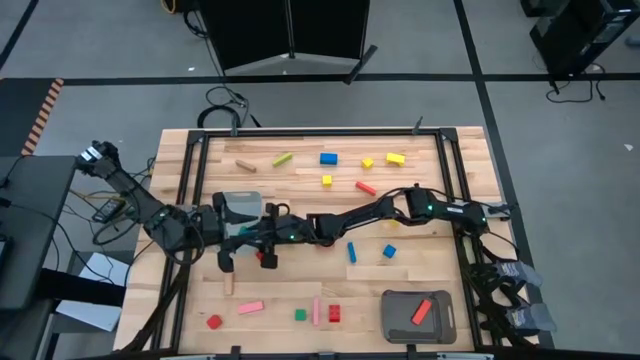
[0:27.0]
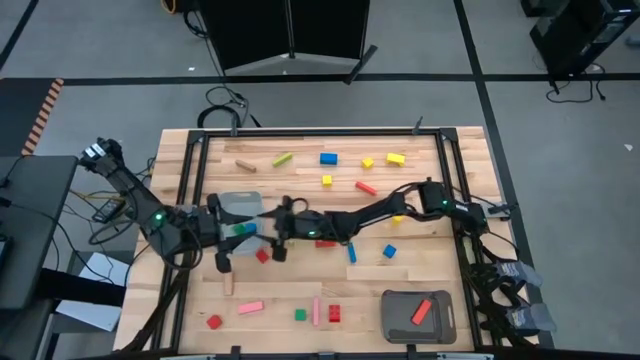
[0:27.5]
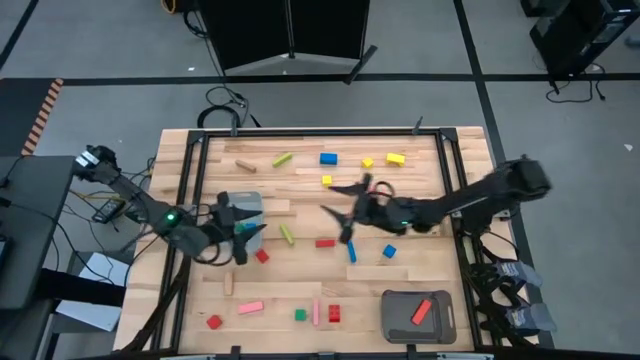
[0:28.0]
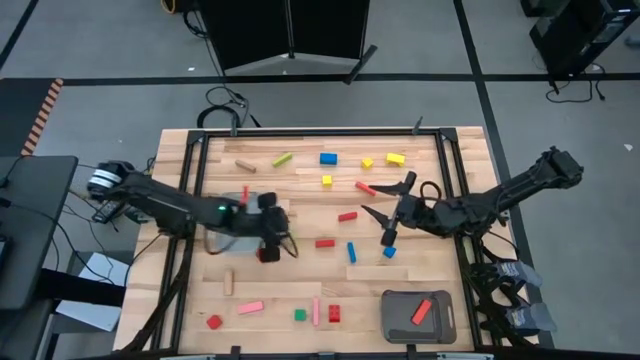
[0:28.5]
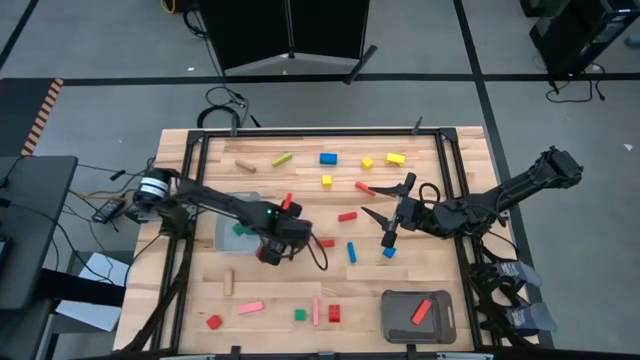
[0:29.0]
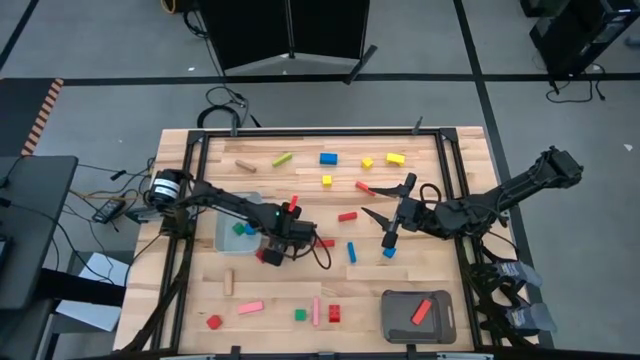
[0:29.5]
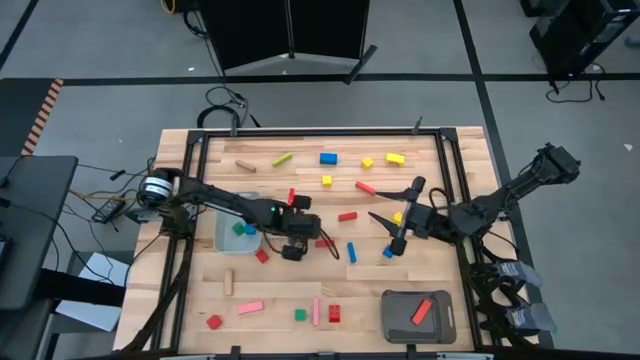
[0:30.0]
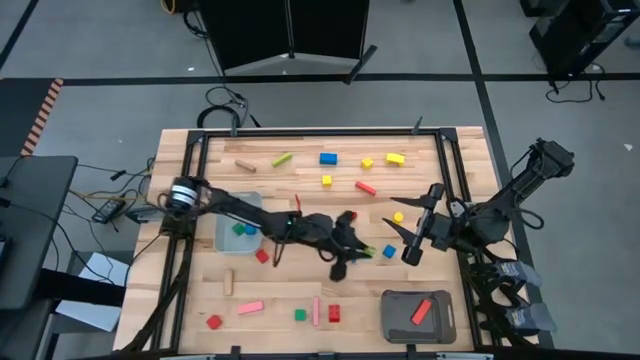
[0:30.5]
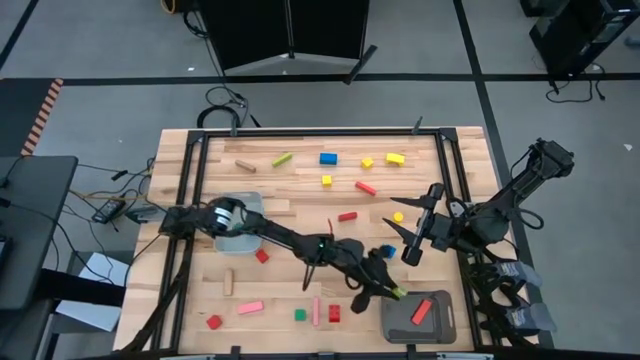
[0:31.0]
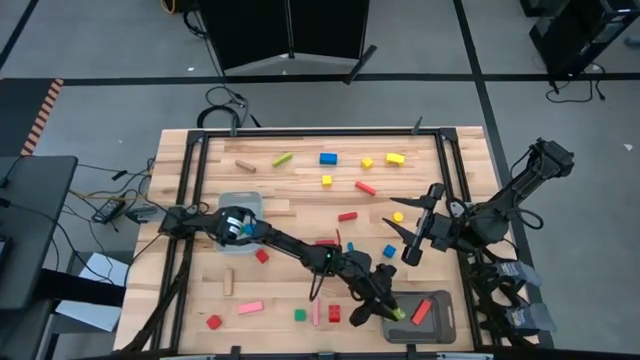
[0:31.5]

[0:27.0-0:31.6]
Task: Sort blocks by size
Put the bottom light green block into the black bin

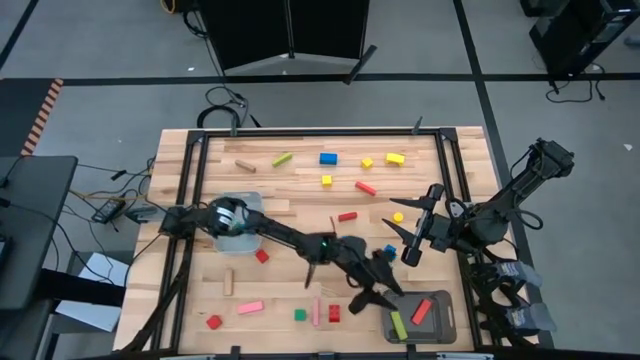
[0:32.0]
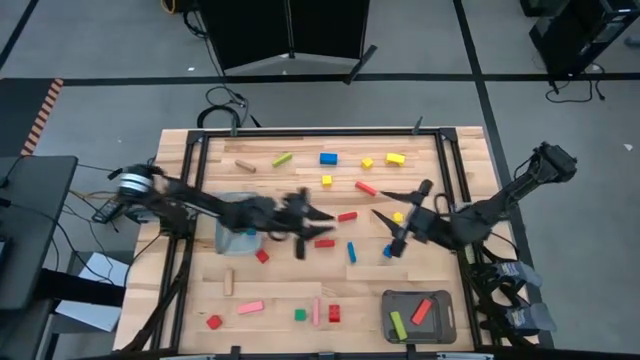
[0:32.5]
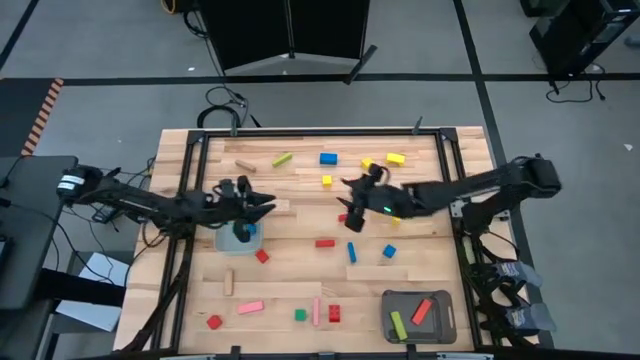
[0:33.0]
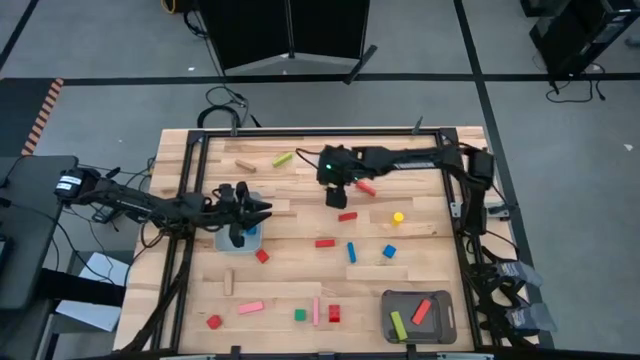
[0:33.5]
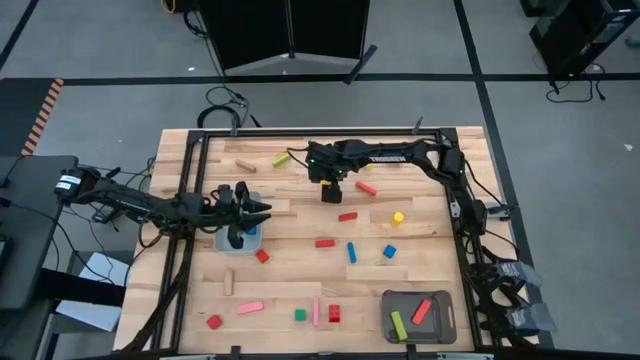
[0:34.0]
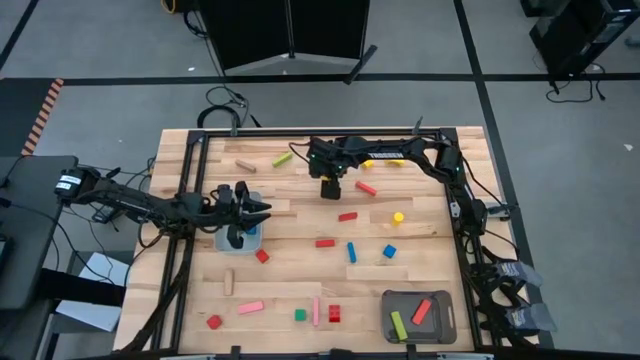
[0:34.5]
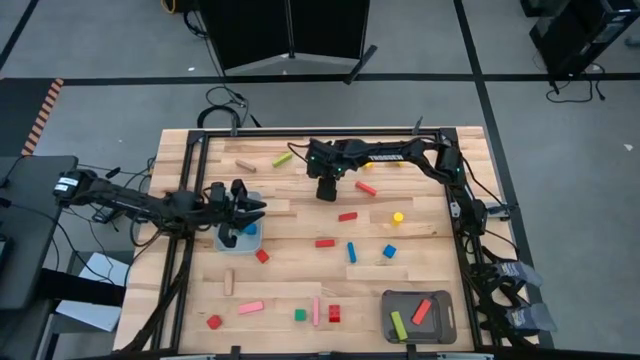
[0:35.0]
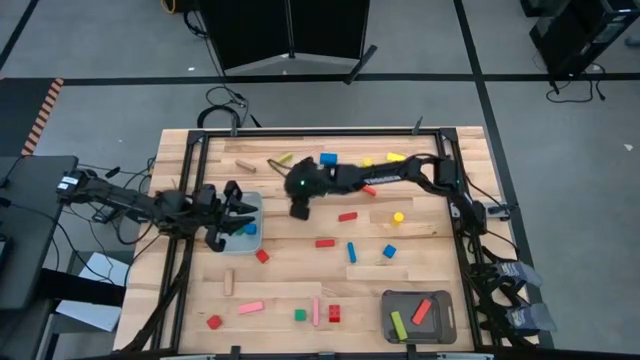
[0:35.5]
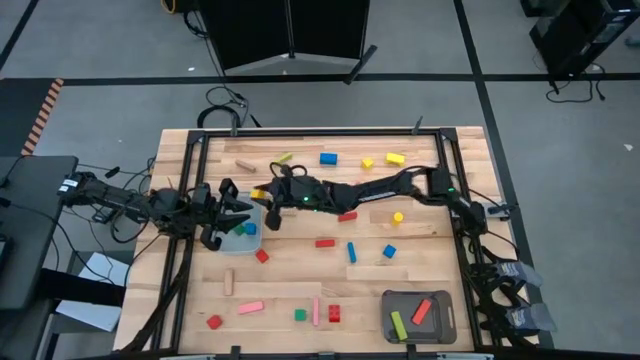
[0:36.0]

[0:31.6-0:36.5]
Put the middle left yellow block into the grey bin

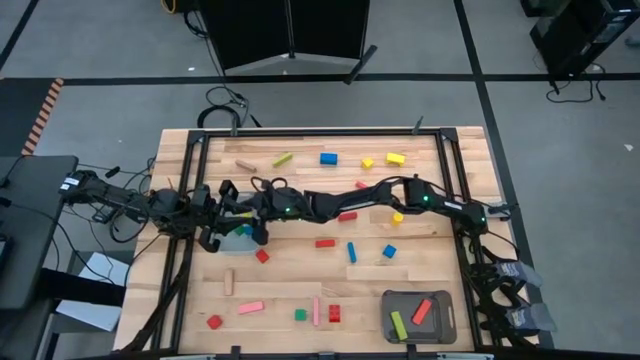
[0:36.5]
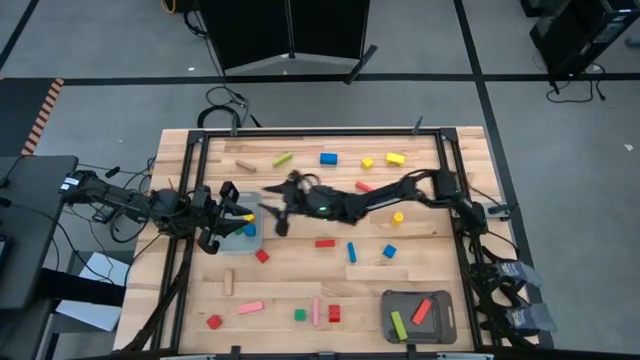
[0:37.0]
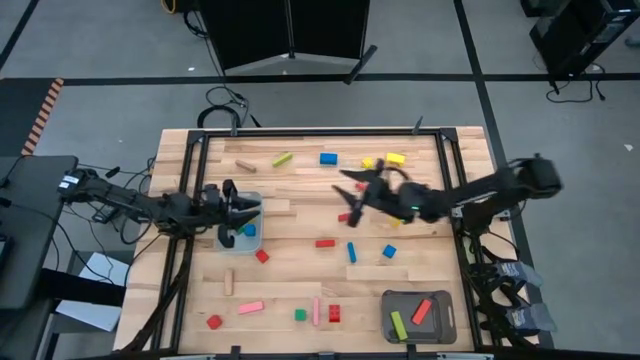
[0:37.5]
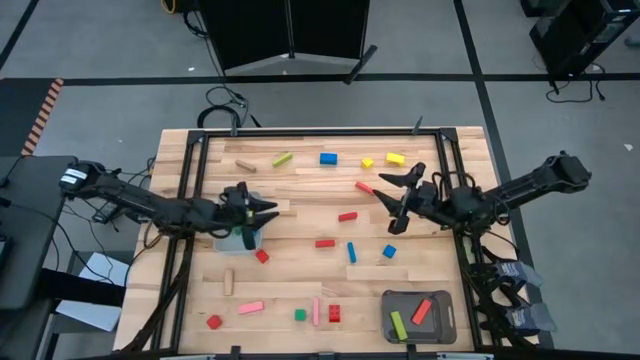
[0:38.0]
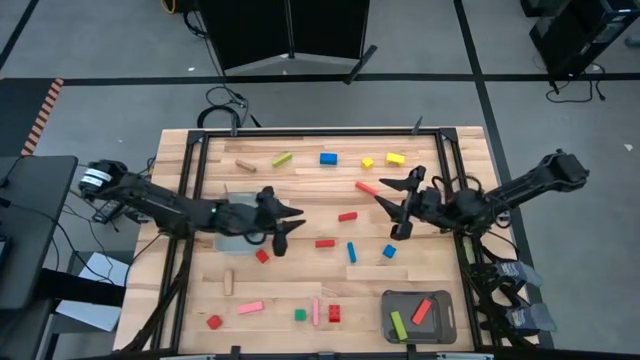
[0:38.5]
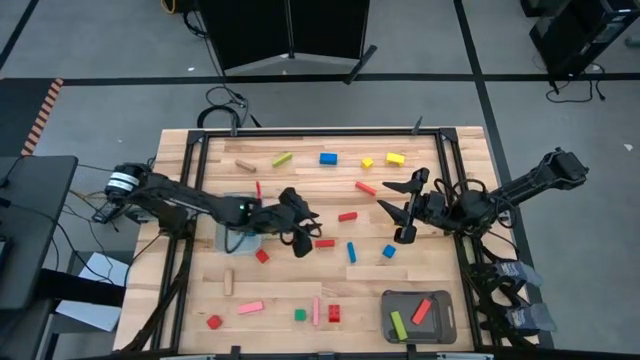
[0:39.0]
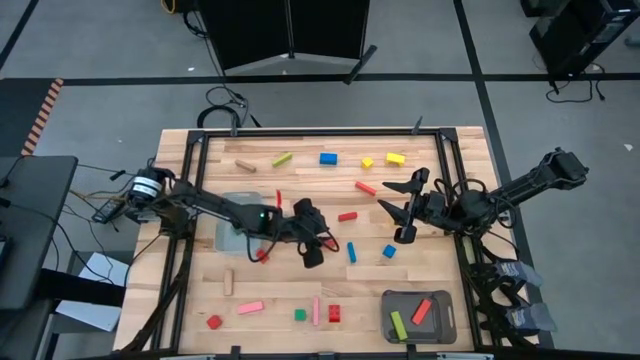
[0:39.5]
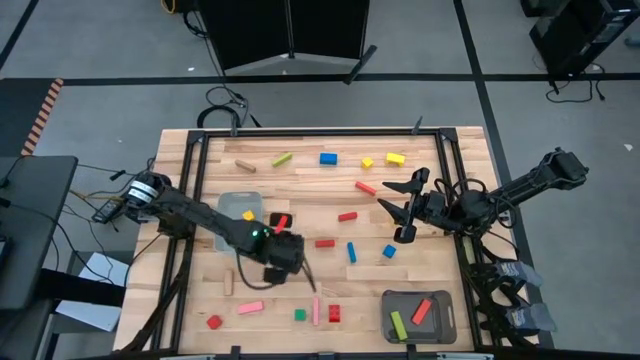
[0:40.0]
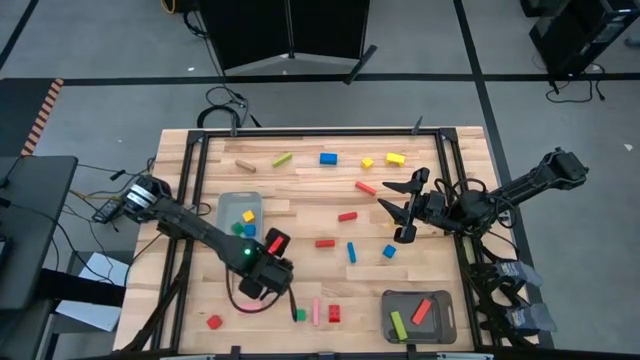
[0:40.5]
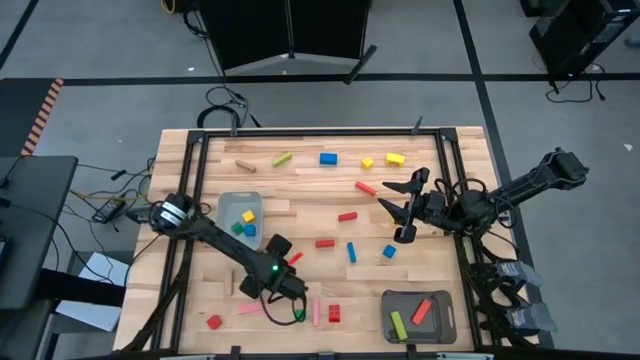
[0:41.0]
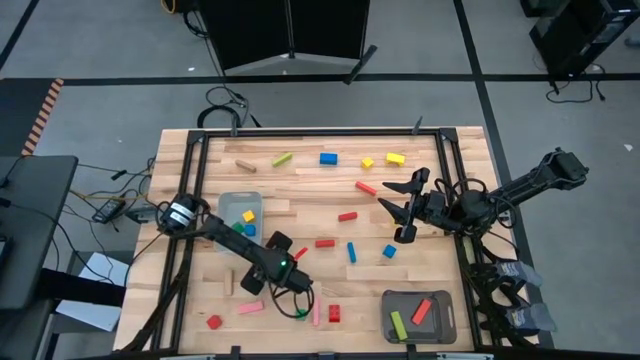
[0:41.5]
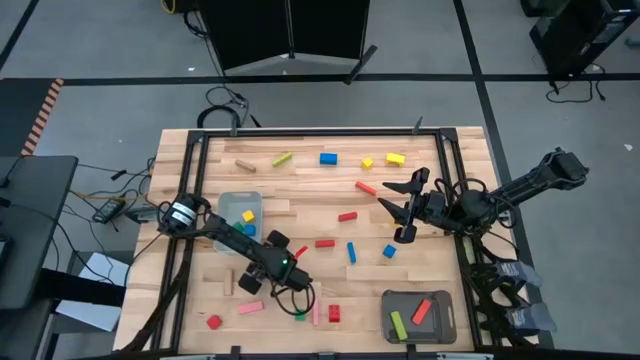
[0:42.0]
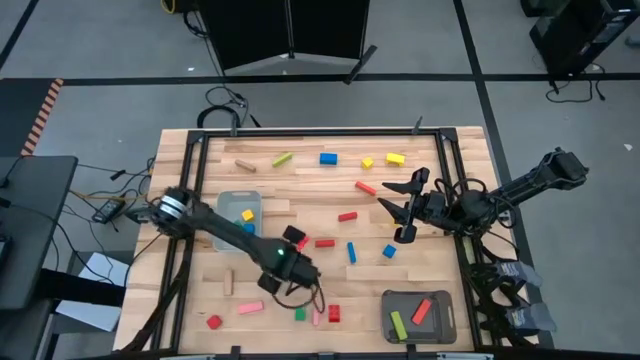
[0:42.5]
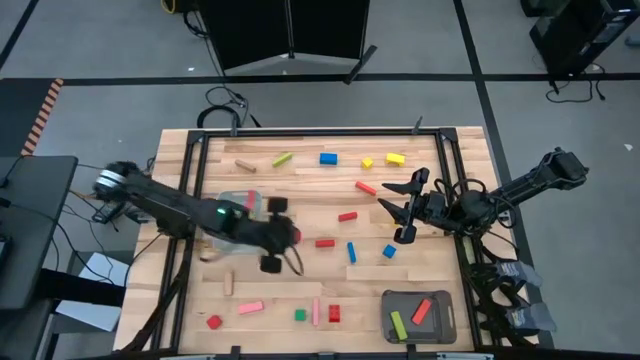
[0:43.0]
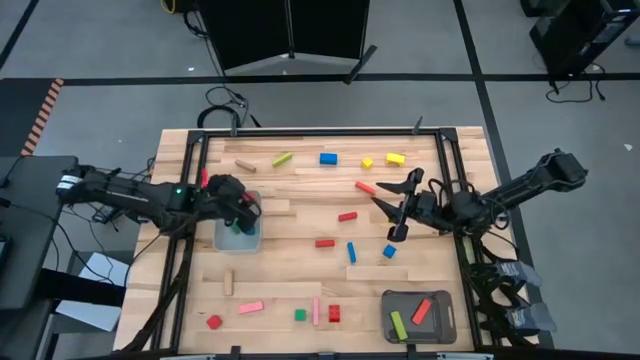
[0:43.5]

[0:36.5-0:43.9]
Put the middle left red block into the grey bin

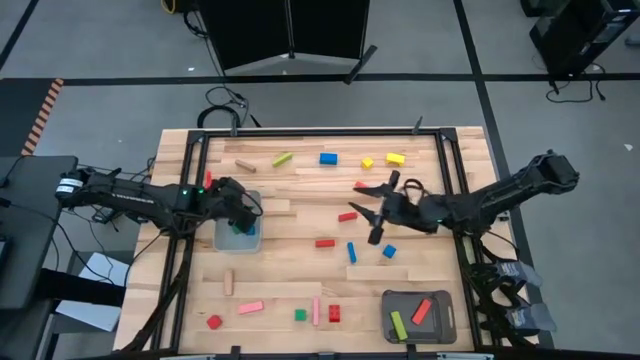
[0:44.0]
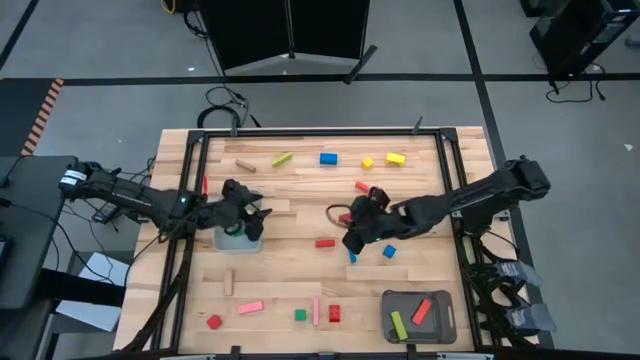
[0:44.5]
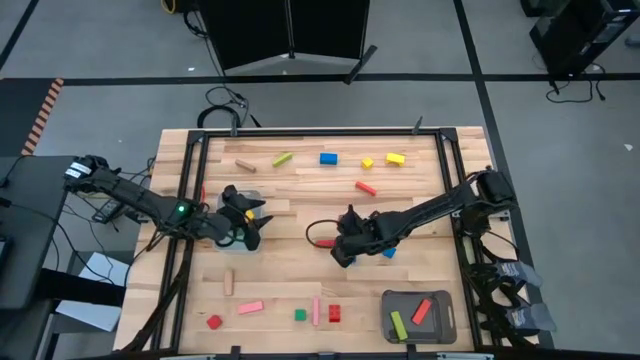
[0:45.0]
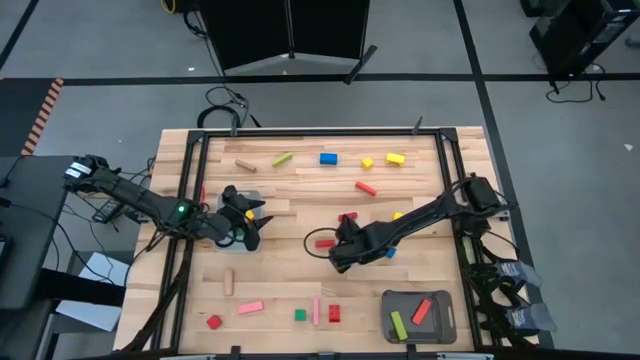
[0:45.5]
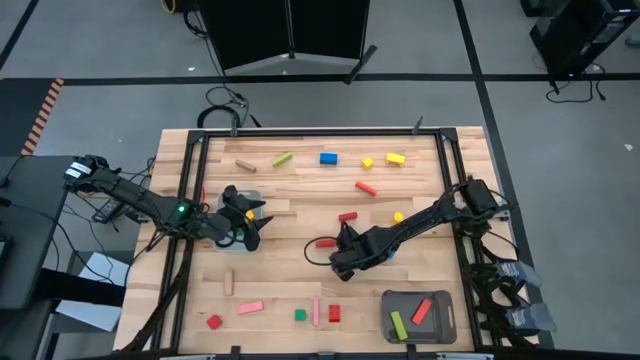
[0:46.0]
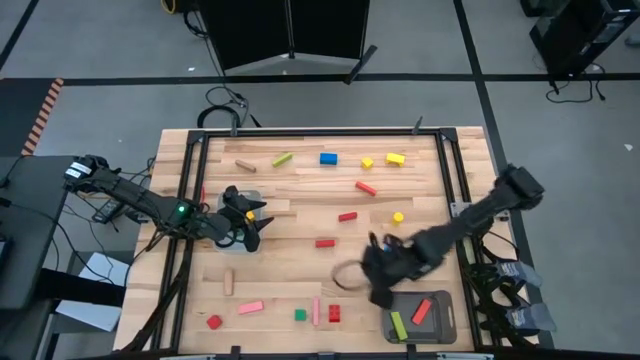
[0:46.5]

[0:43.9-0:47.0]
Put the bottom center blue block into the black bin

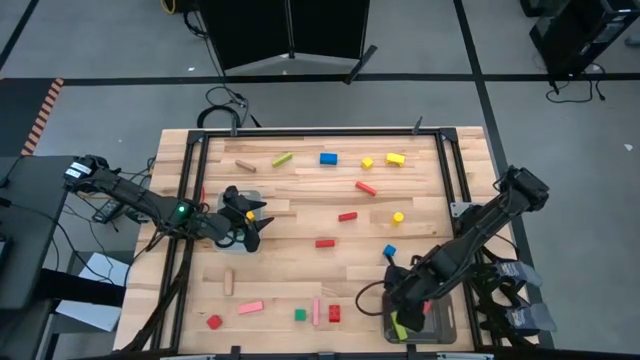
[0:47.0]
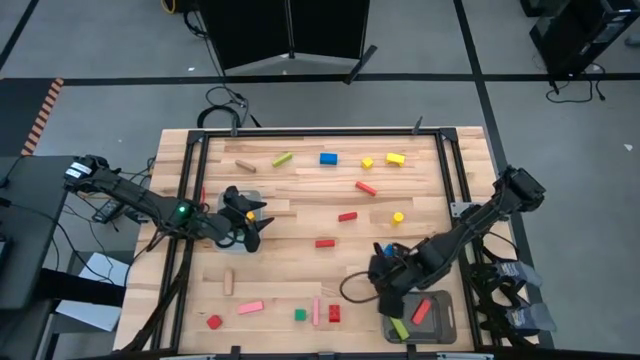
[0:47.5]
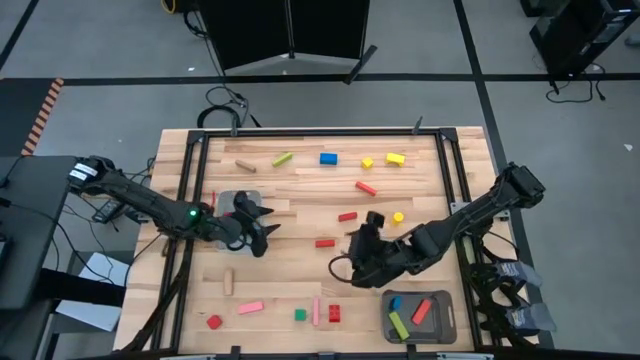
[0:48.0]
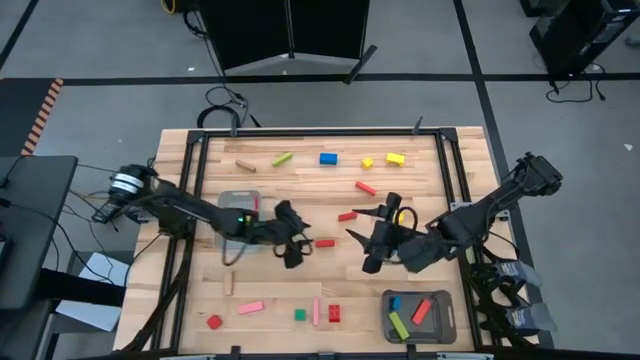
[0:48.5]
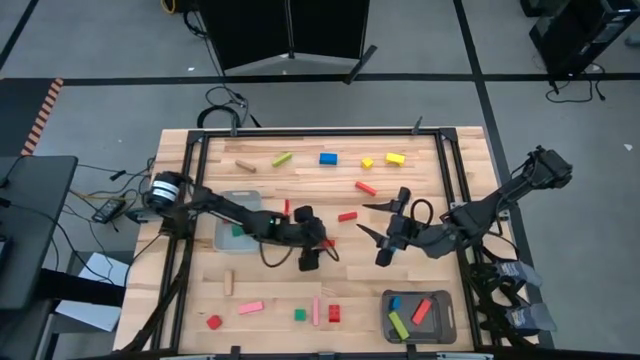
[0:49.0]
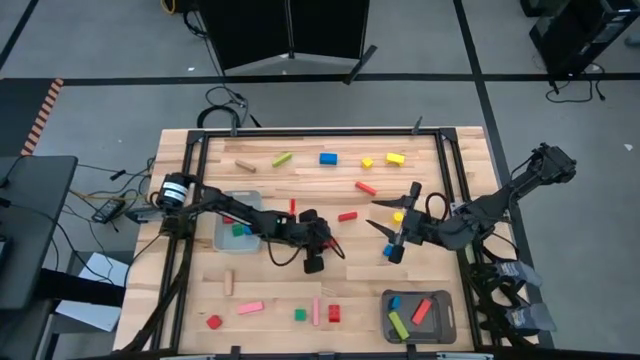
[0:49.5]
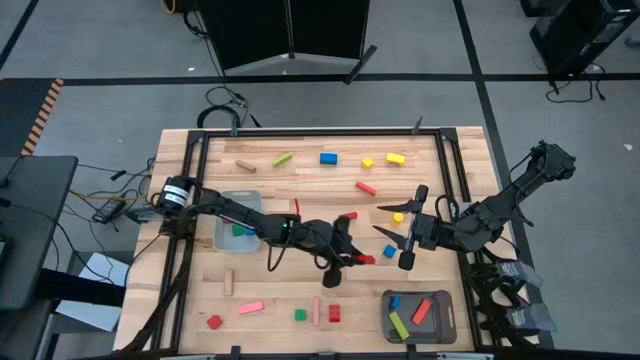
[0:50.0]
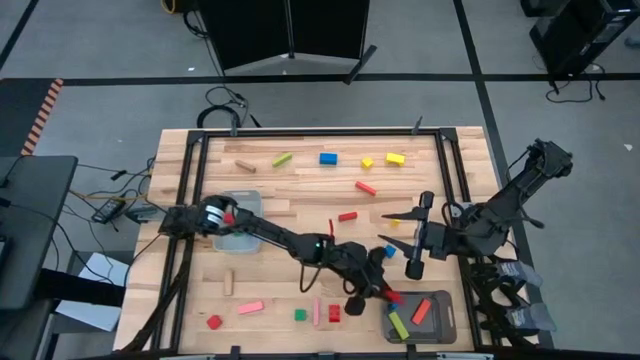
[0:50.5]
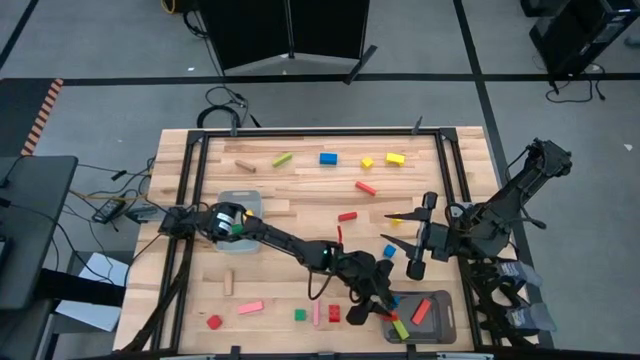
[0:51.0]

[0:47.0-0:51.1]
Put the center red block into the black bin
